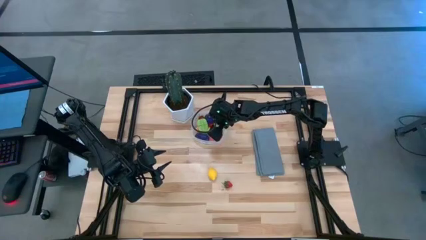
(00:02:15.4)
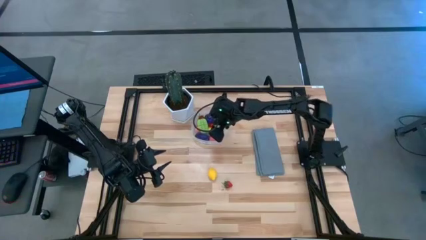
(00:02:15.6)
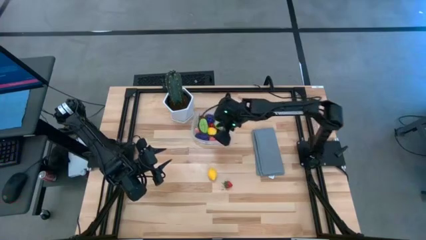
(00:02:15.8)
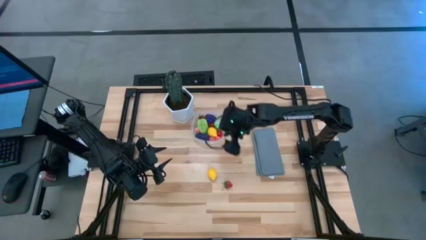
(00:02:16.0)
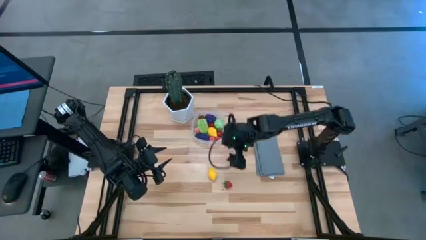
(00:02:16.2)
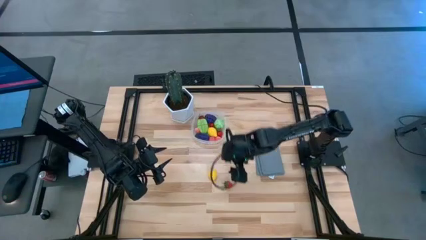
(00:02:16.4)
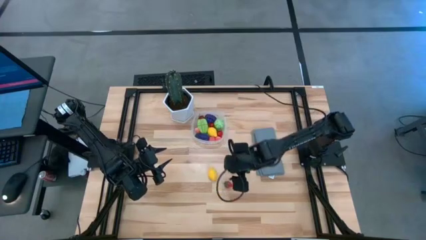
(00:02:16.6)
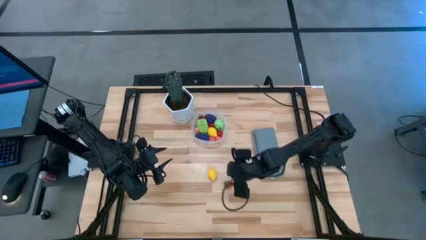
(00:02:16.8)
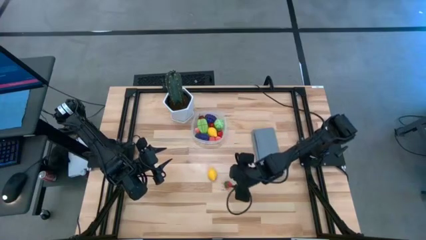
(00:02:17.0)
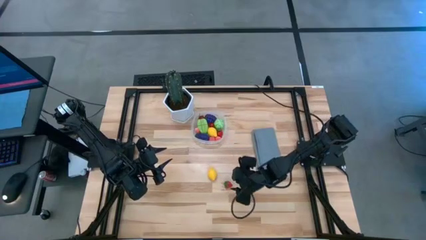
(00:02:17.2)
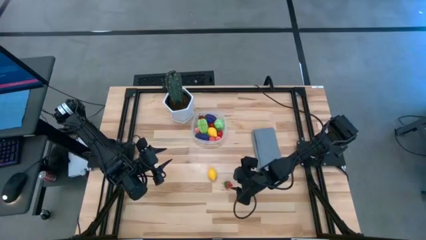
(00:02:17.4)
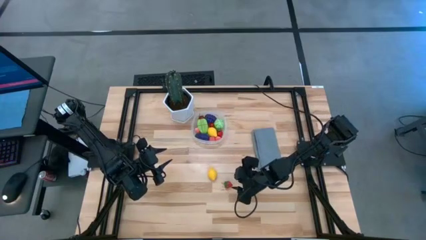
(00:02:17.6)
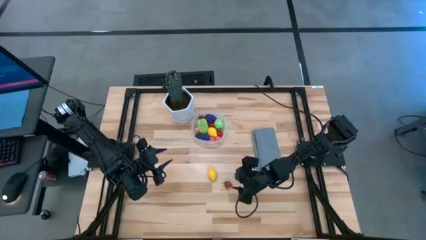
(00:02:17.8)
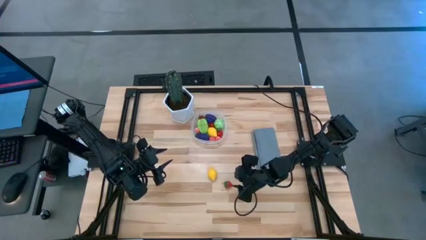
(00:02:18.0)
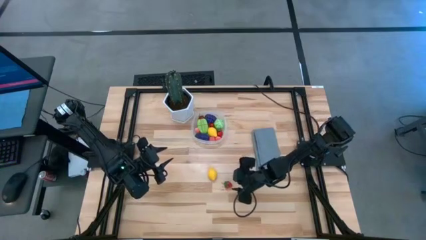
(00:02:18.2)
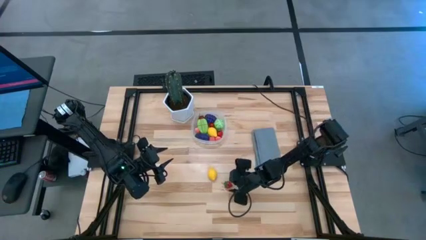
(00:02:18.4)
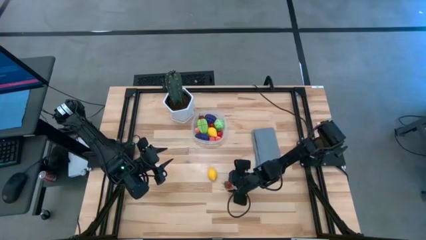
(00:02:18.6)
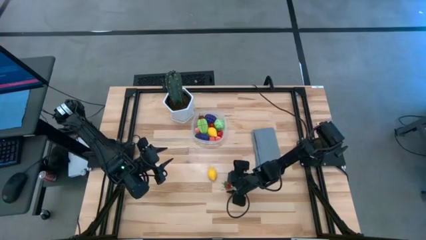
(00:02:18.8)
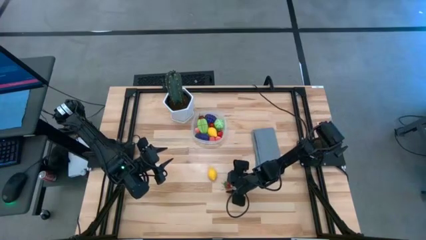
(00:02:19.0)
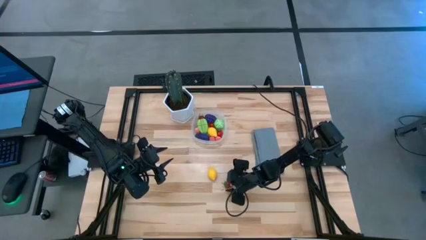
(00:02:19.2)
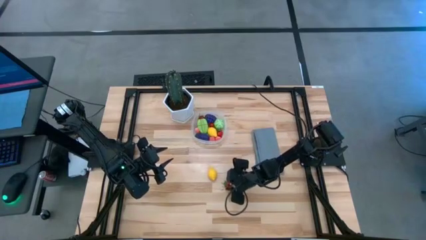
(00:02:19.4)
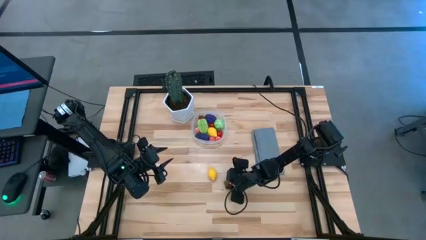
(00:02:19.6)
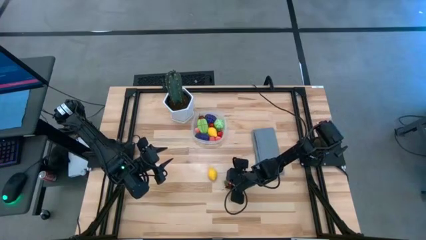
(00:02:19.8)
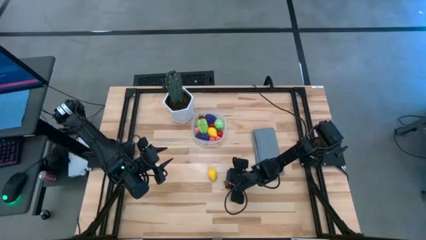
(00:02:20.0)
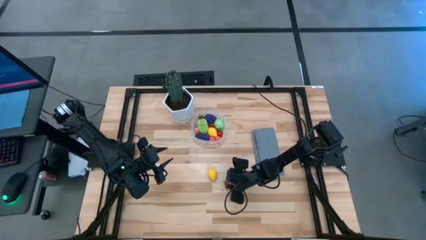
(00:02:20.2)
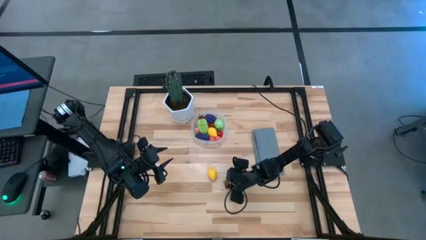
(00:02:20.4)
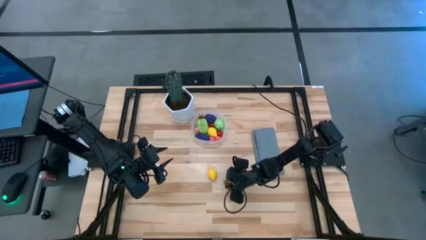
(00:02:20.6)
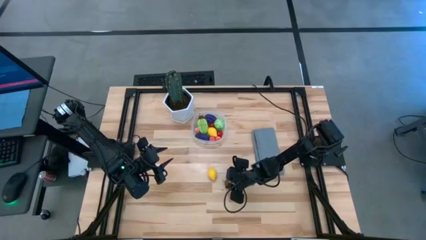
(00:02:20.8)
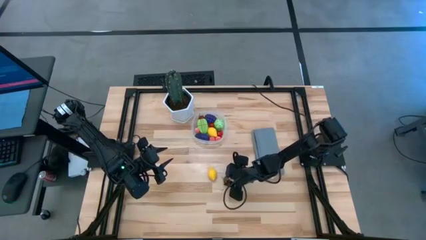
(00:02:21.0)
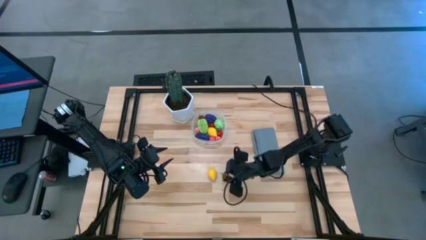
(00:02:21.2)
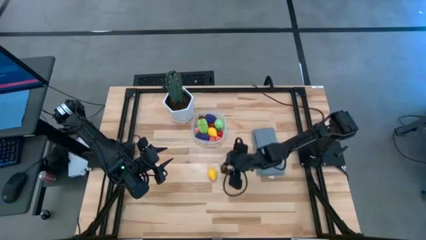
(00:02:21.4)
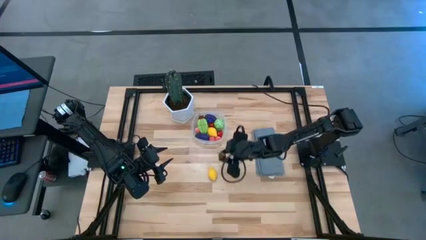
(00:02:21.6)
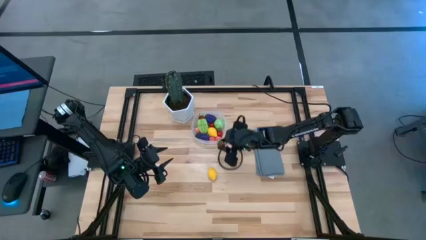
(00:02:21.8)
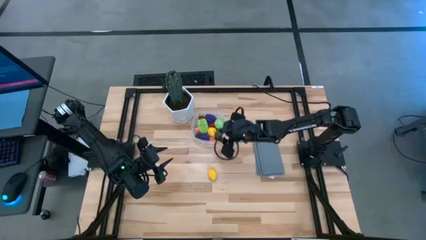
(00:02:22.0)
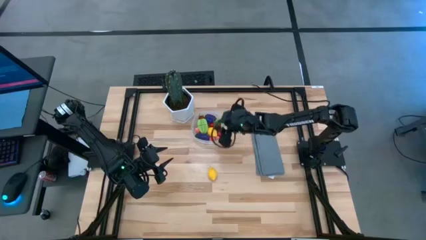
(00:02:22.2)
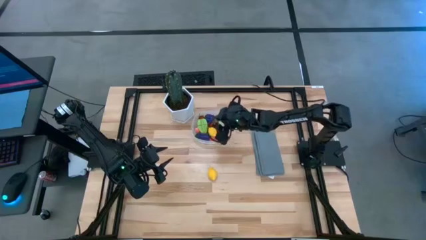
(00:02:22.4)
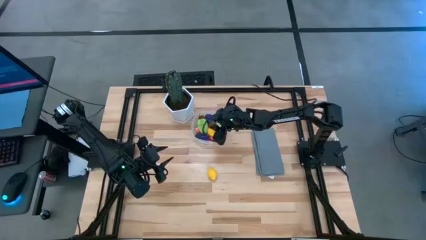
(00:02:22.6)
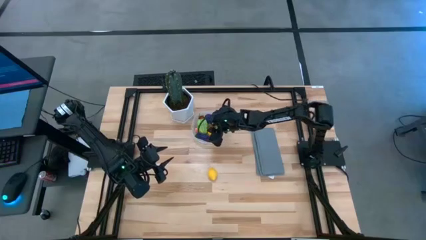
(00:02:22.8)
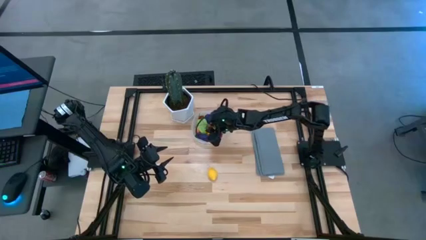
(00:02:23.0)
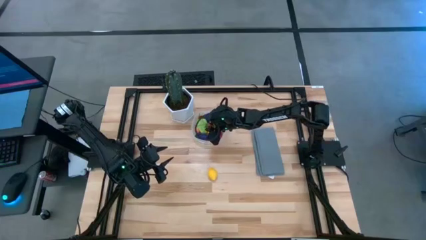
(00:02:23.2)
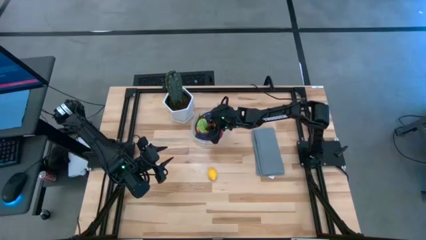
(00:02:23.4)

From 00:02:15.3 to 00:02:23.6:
Task: Pick and placing Produce into tupperware
Put the strawberry into the transparent bin

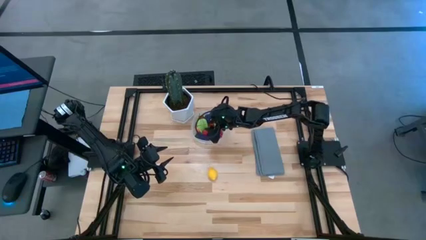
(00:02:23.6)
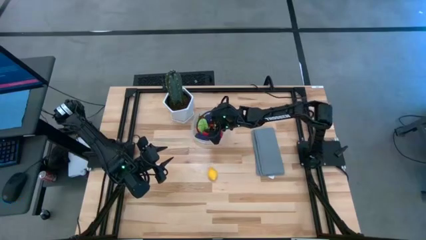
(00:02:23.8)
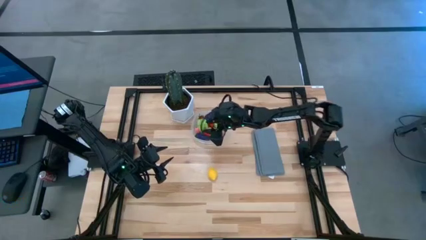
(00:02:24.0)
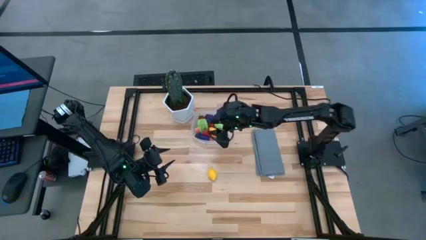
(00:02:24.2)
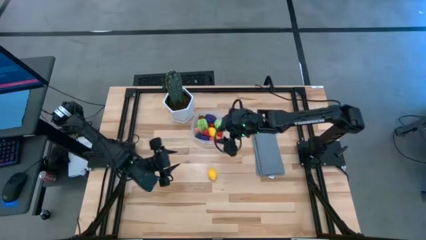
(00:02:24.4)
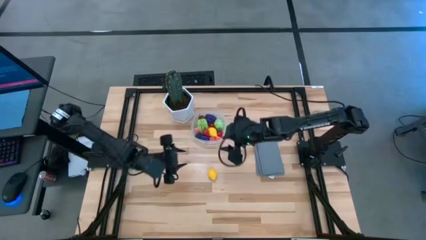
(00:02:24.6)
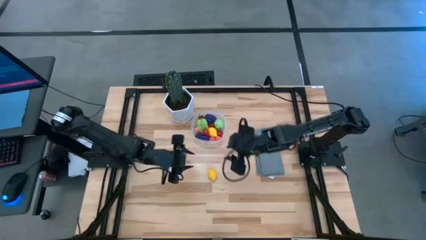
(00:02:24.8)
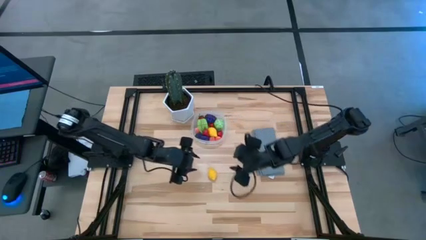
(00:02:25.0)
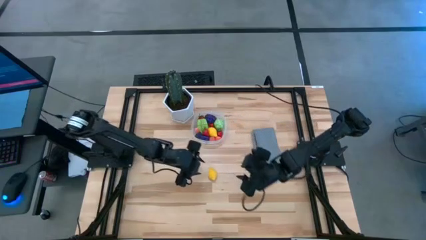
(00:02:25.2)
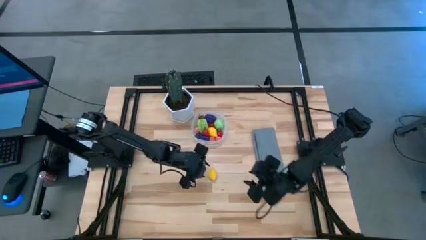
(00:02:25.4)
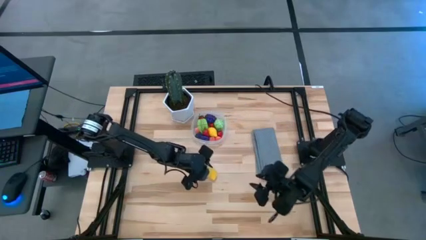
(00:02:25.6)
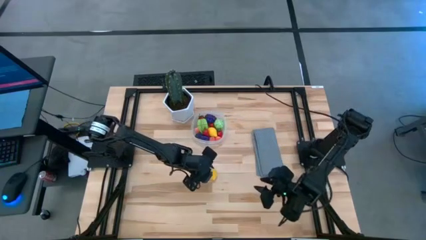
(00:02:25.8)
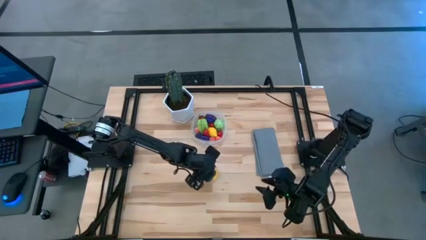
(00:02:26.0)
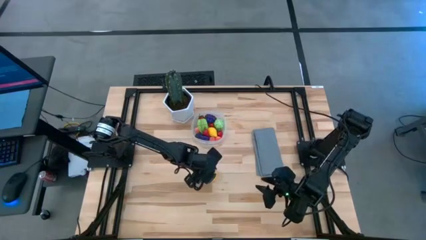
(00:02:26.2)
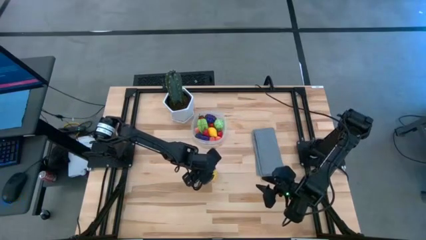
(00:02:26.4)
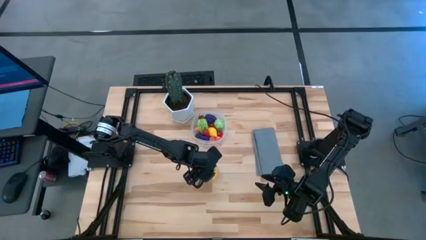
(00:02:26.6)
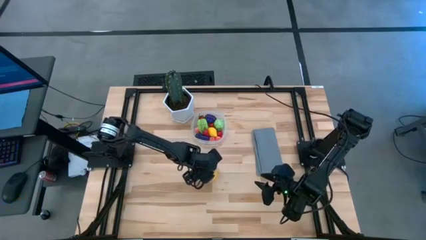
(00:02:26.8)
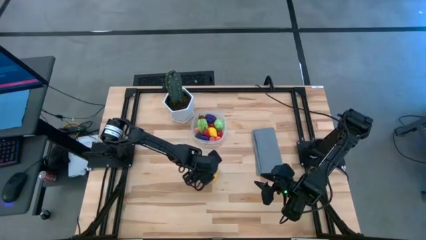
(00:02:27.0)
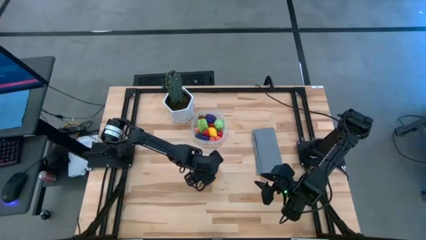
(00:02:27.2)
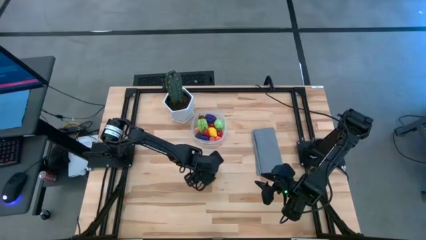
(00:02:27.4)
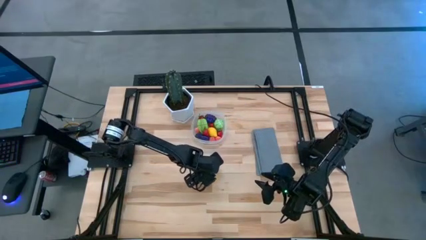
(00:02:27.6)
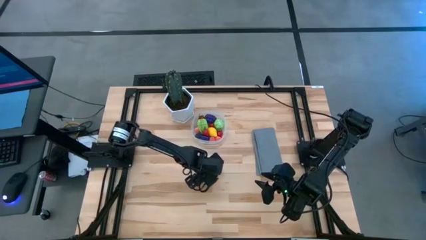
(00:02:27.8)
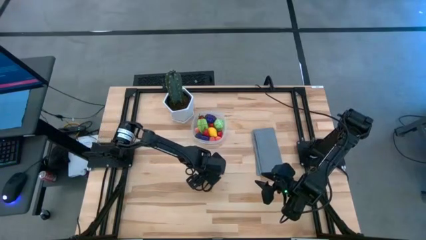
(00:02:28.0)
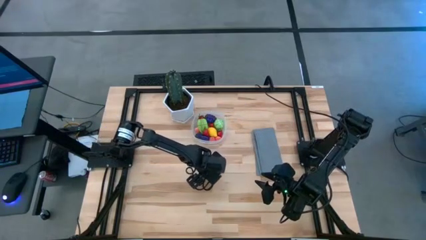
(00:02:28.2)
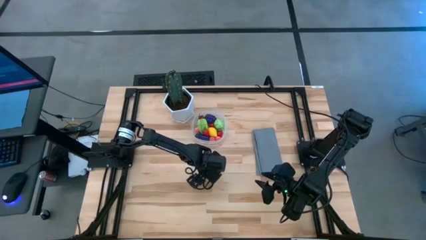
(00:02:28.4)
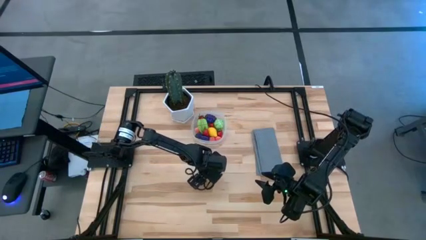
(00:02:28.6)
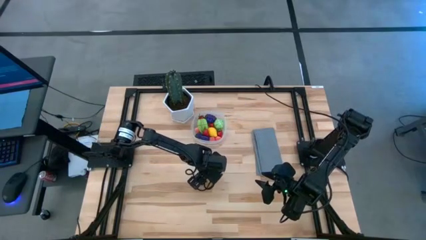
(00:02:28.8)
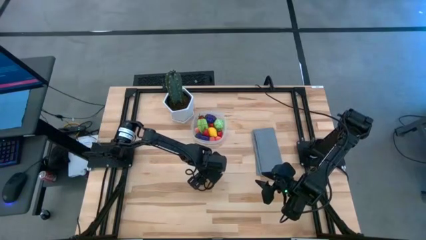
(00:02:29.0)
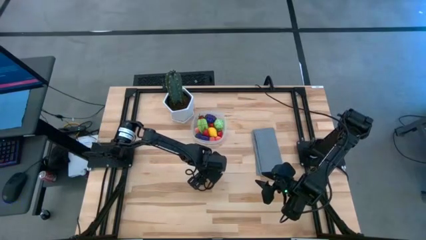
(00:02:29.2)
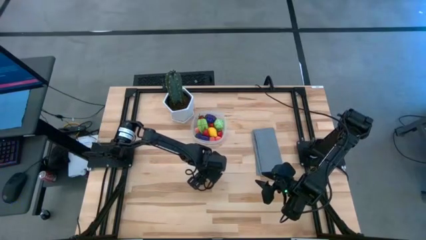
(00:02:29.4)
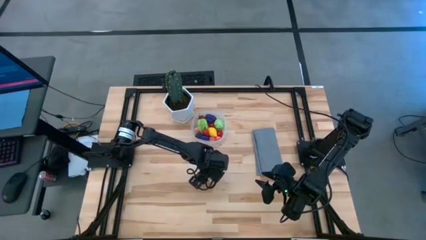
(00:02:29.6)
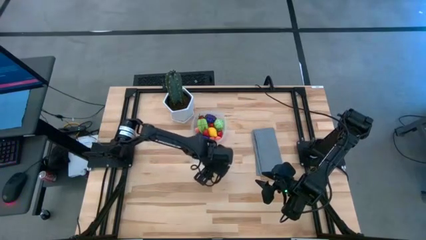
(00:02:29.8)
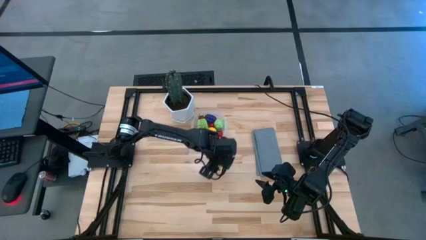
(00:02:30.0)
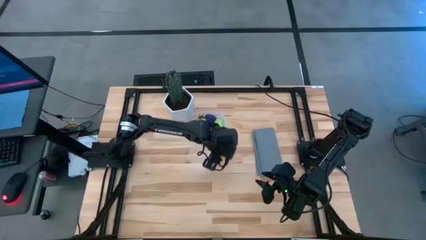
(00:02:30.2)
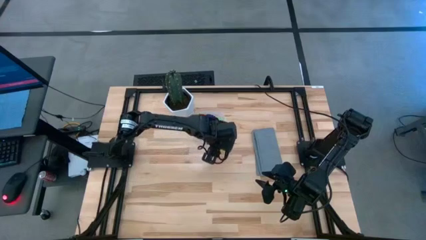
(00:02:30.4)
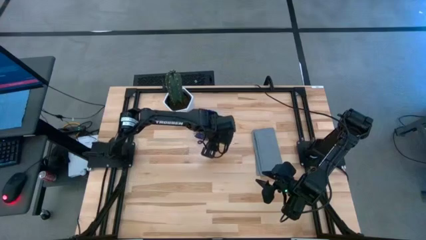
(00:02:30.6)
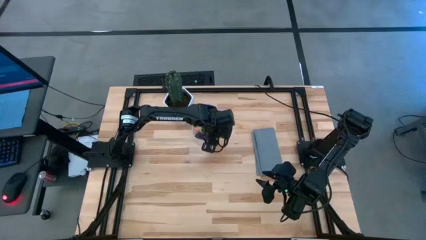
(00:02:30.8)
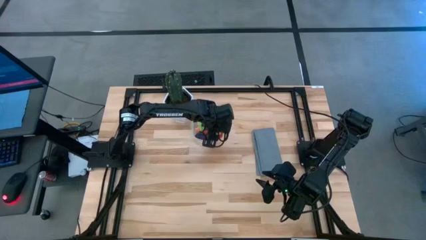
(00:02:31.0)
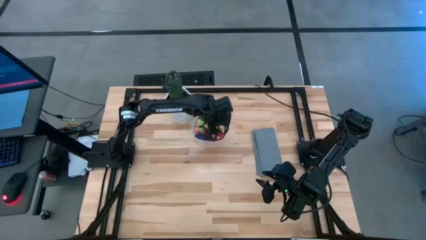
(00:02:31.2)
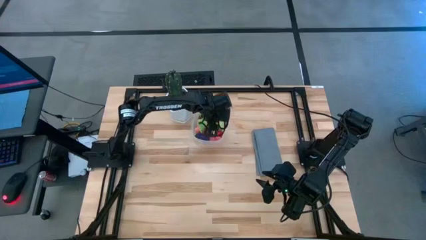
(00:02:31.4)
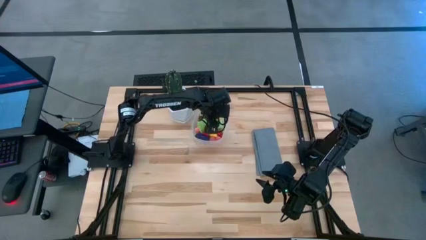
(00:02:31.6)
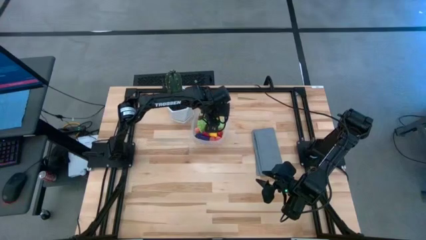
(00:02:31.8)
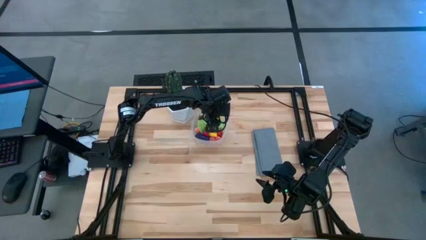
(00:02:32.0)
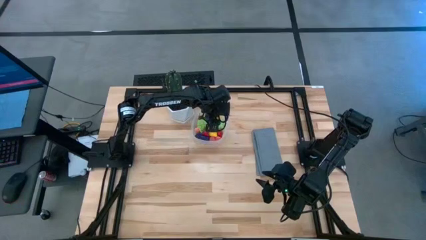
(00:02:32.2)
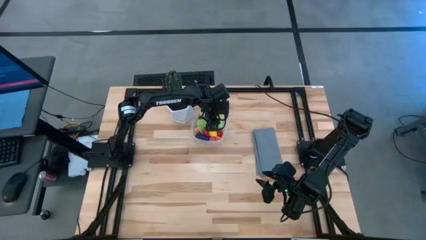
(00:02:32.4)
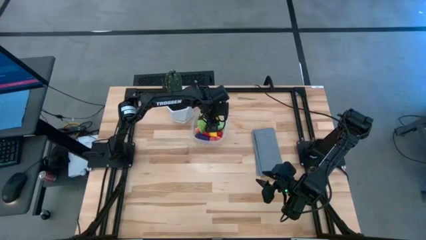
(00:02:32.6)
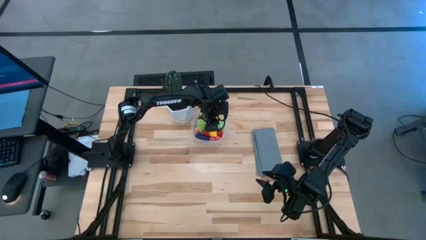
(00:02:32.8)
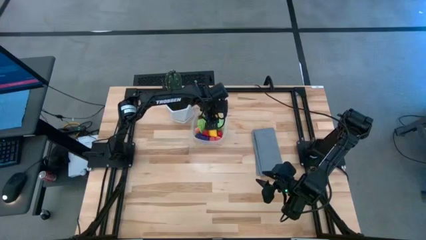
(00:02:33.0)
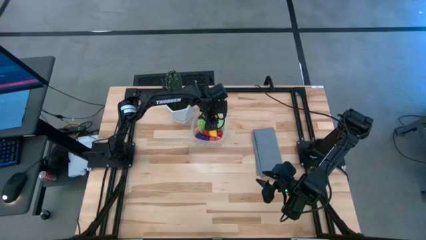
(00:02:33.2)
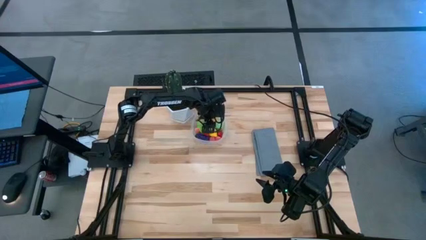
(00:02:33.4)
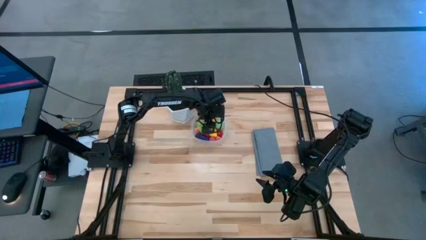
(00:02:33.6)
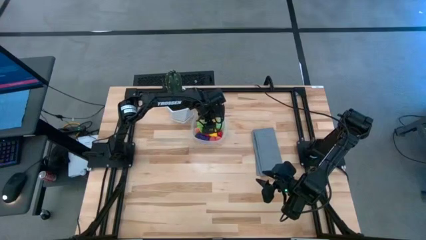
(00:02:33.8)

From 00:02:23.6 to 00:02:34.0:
Put the lemon into the transparent bin
